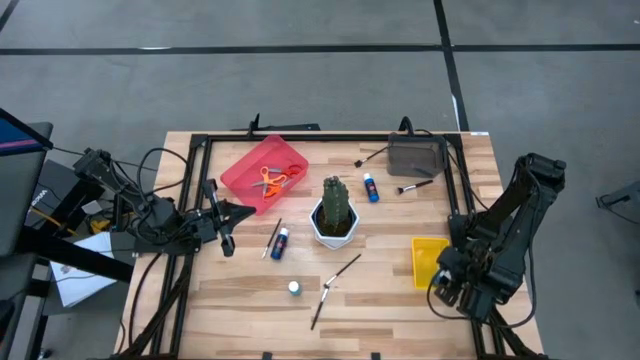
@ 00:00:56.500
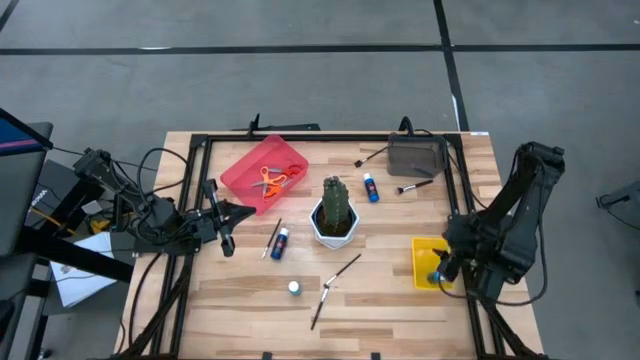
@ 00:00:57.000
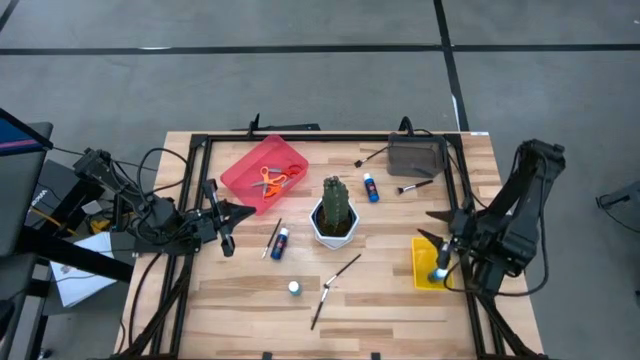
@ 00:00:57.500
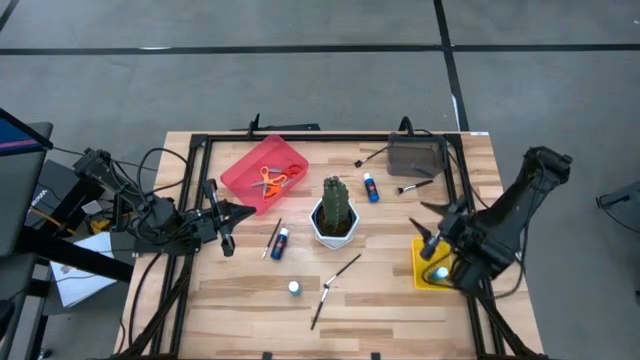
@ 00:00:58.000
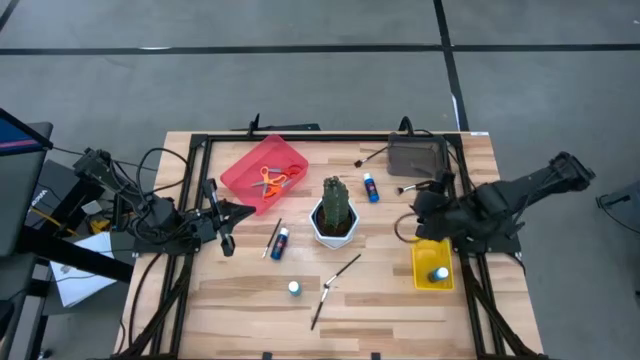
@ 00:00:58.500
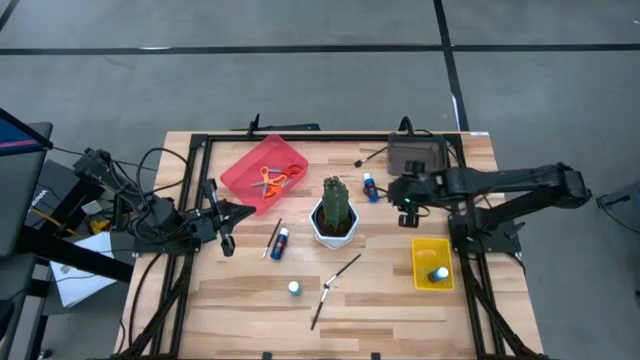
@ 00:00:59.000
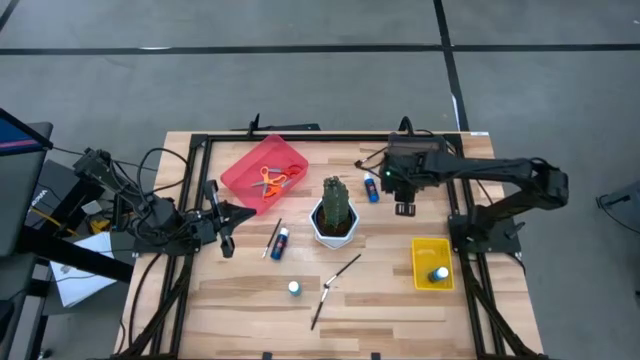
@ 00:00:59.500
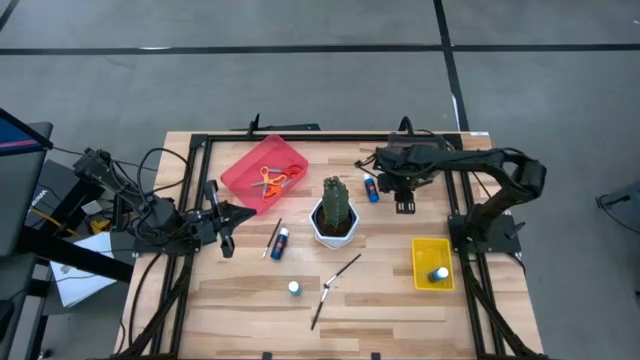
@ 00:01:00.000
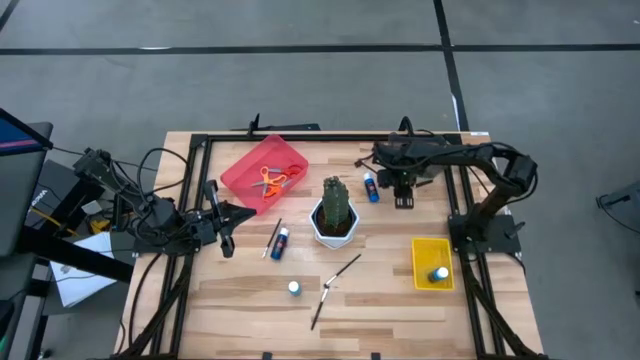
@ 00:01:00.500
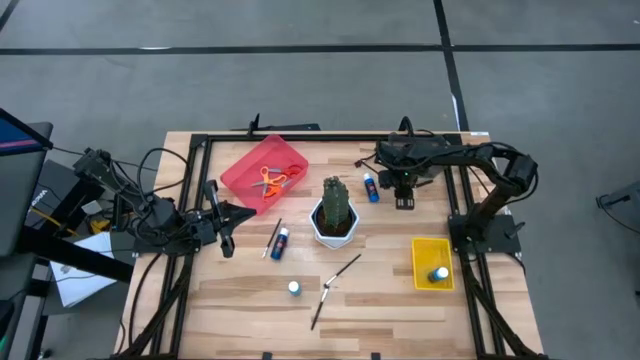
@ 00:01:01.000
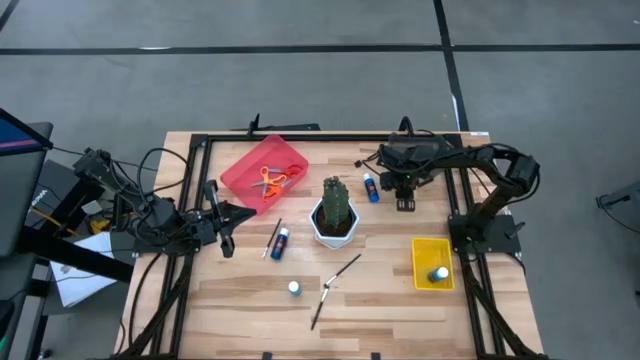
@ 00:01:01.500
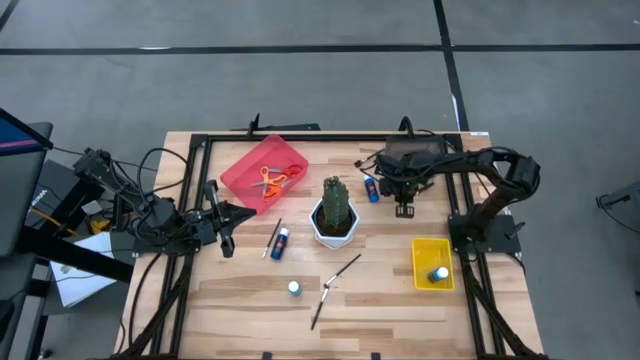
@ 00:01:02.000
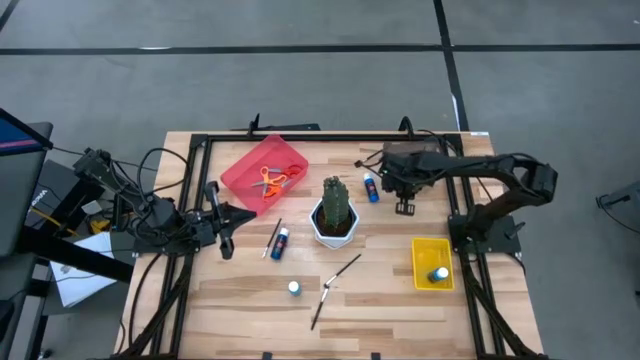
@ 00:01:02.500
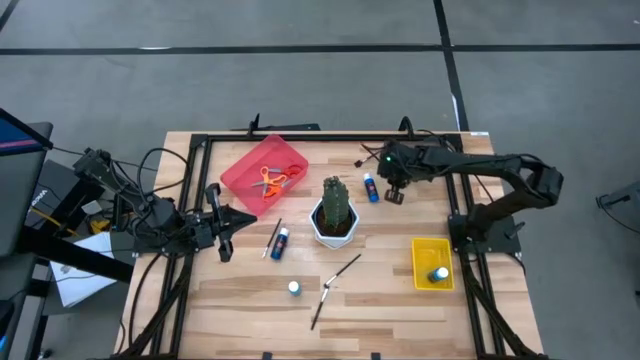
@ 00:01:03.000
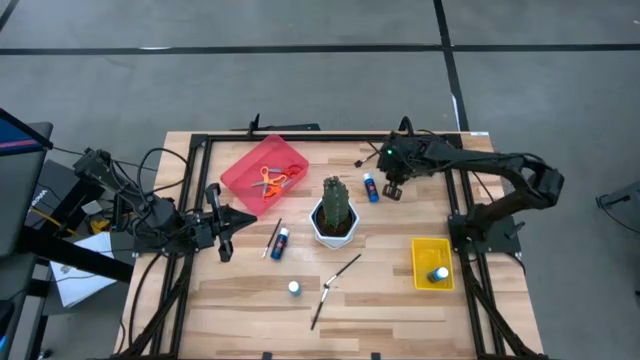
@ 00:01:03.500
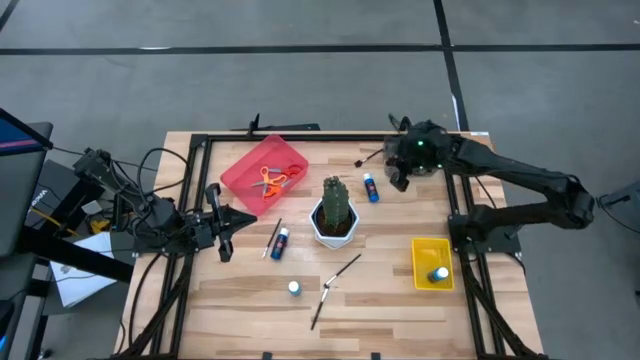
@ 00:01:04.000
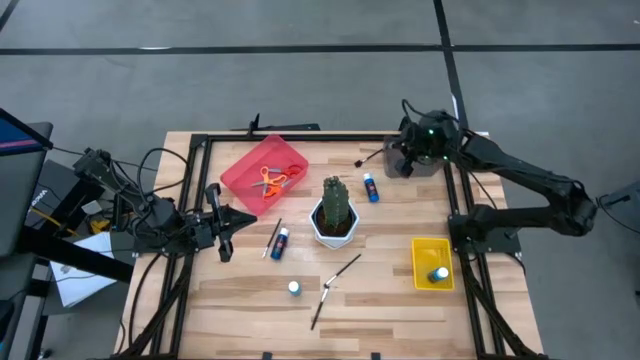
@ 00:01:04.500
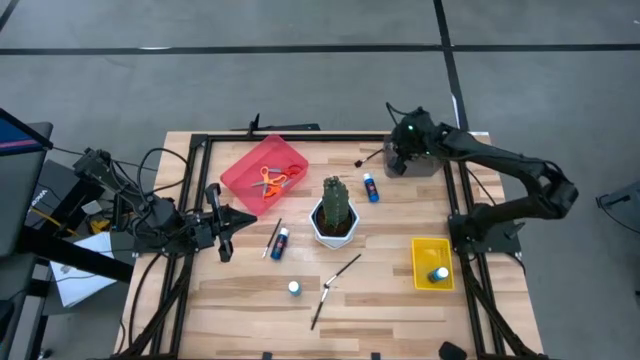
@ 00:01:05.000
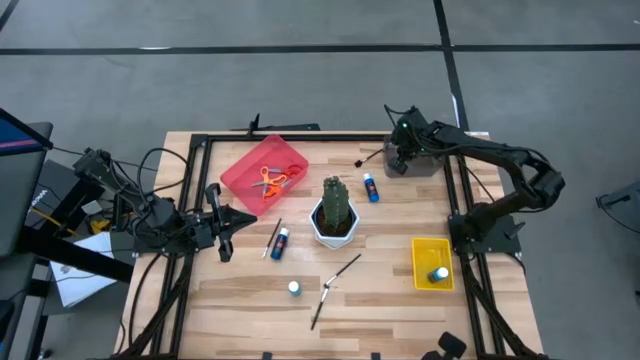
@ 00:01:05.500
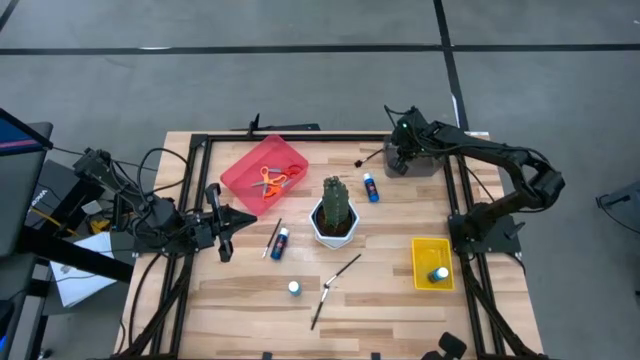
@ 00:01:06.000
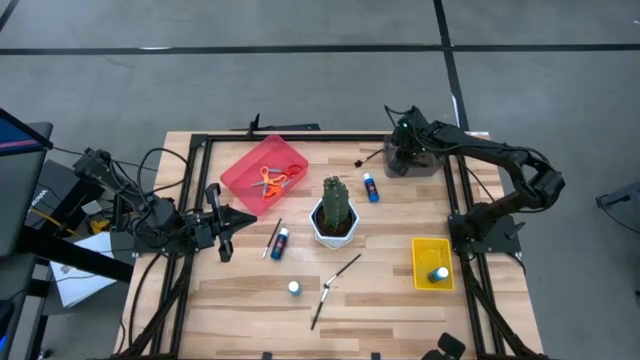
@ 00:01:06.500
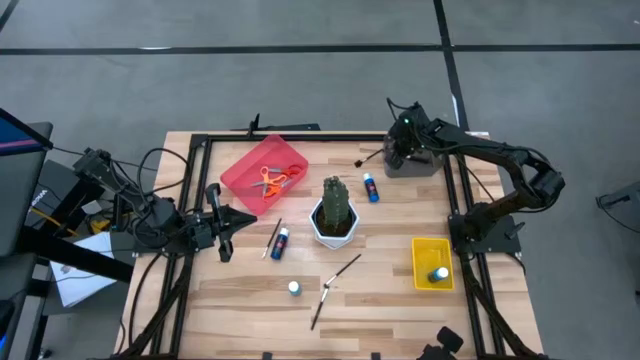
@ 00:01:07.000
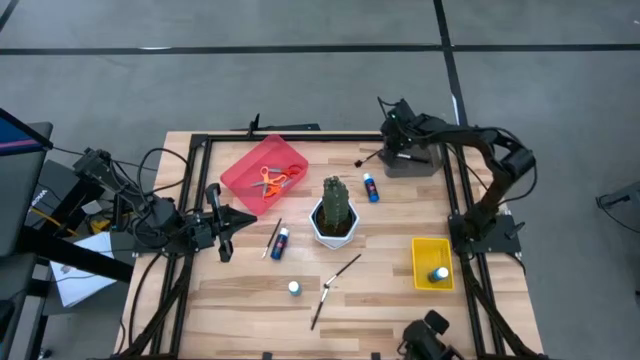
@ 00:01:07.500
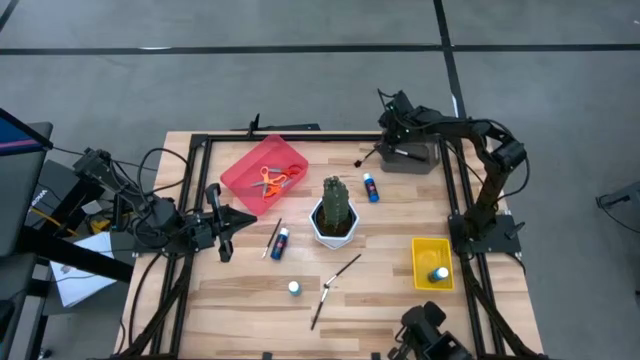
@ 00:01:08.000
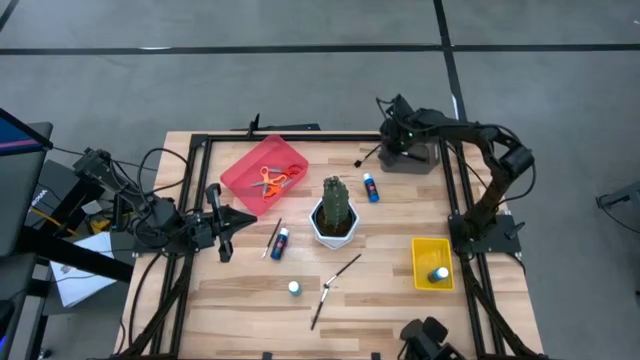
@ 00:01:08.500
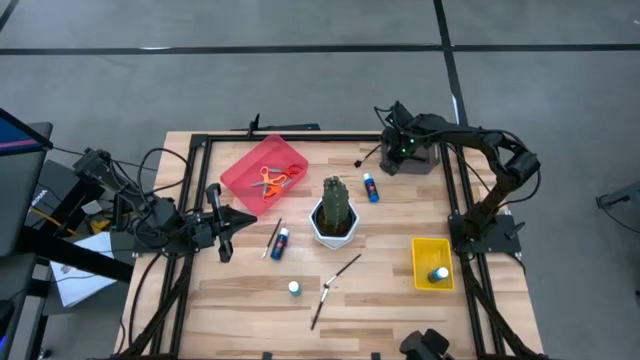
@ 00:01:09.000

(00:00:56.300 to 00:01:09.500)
Task: Pick & Place Paint Supplies
Put the powder brush into the black bin

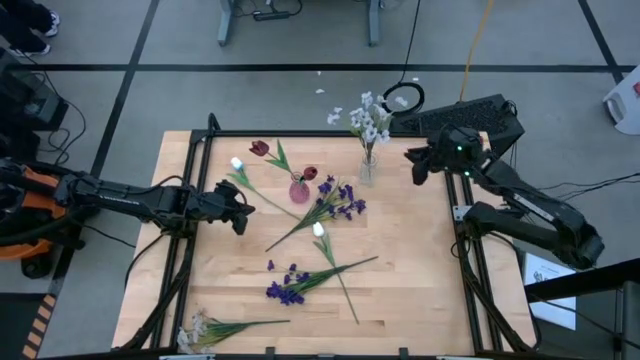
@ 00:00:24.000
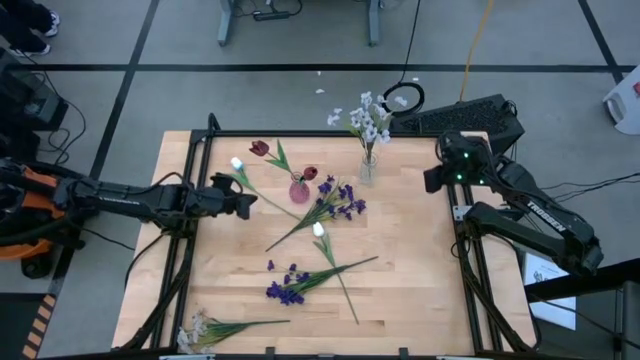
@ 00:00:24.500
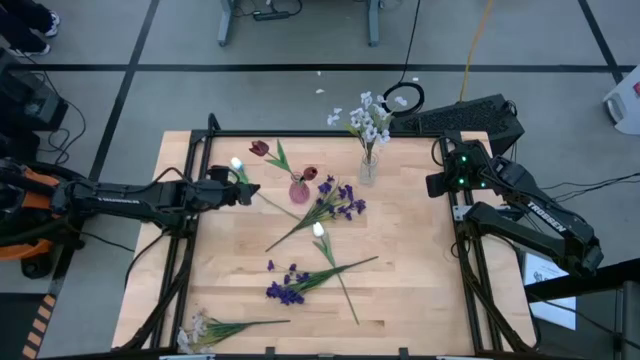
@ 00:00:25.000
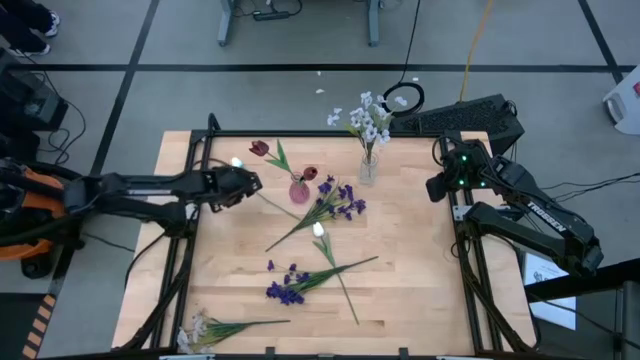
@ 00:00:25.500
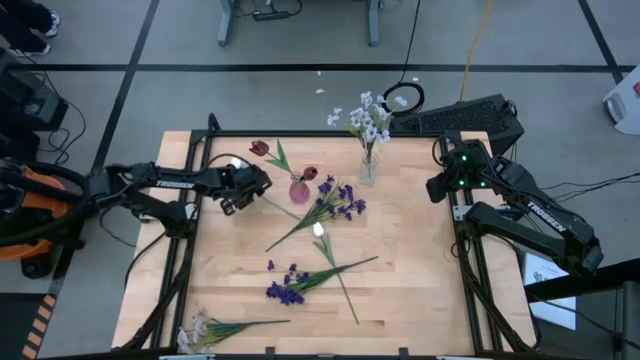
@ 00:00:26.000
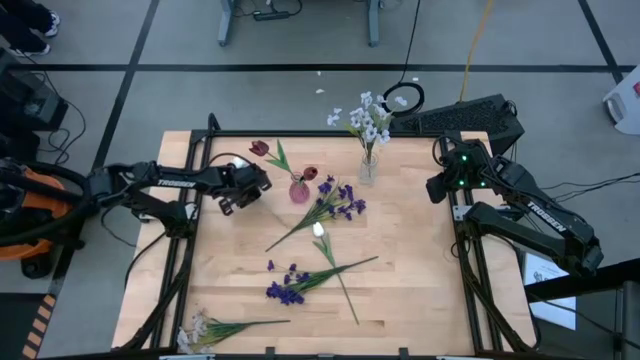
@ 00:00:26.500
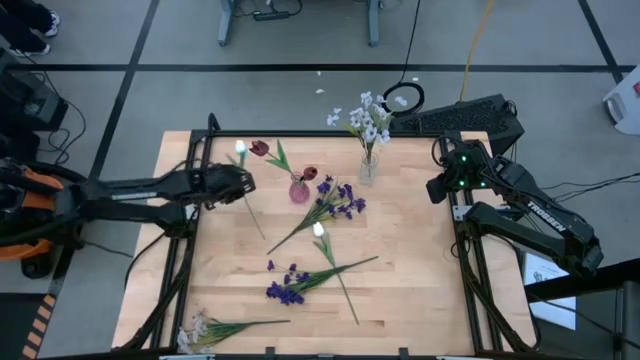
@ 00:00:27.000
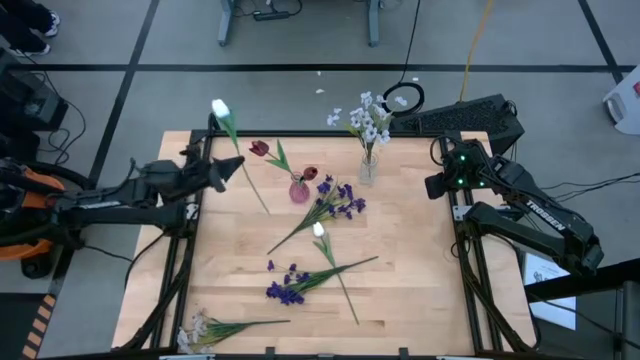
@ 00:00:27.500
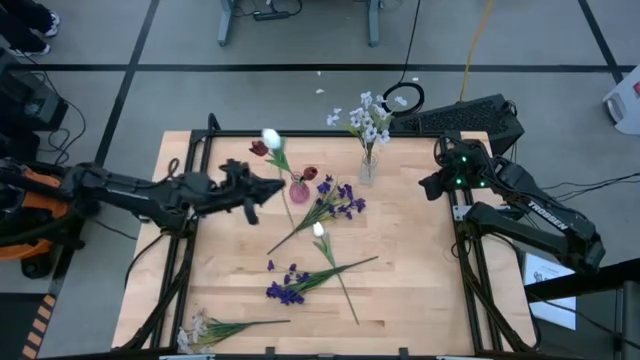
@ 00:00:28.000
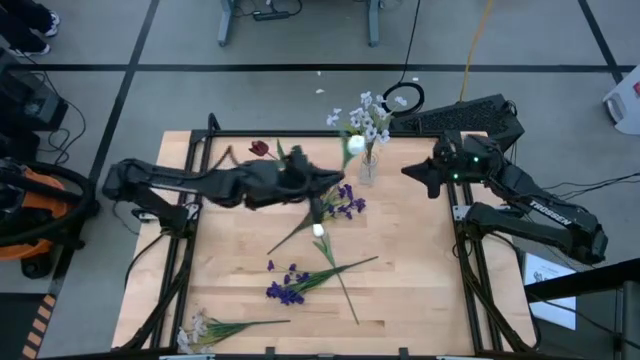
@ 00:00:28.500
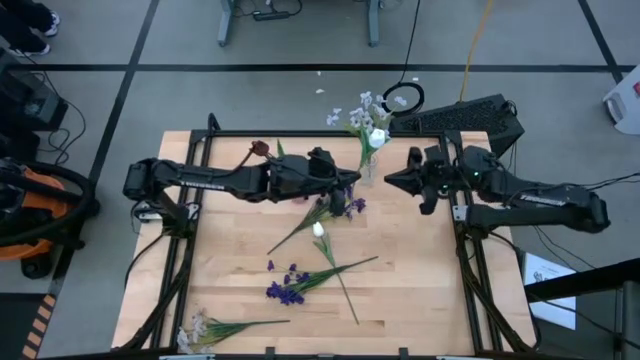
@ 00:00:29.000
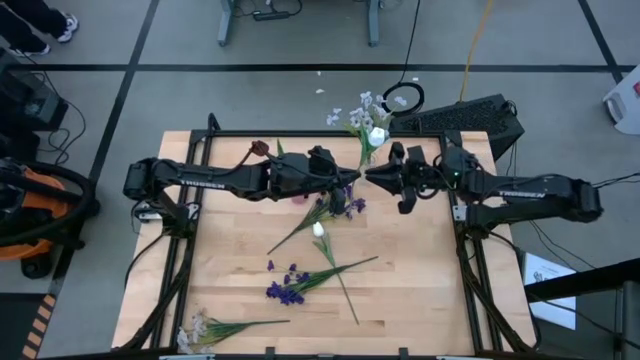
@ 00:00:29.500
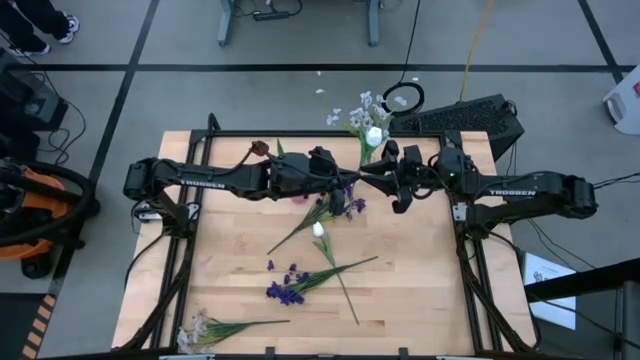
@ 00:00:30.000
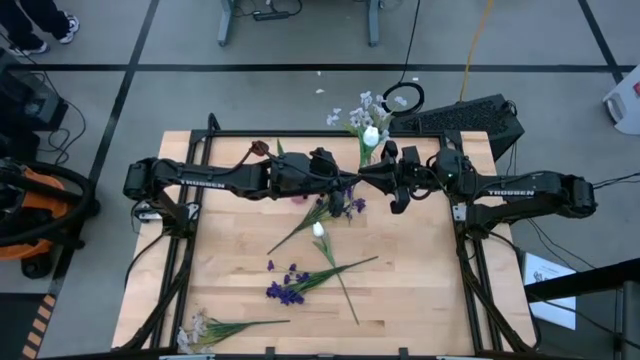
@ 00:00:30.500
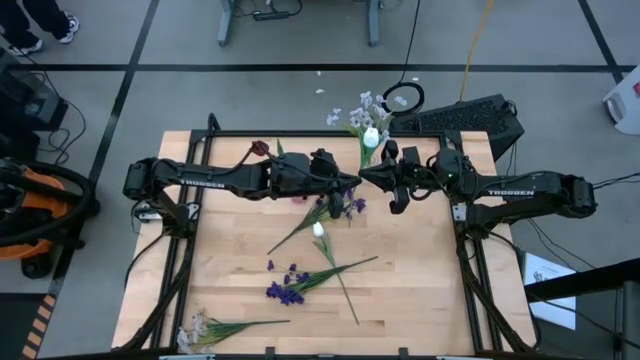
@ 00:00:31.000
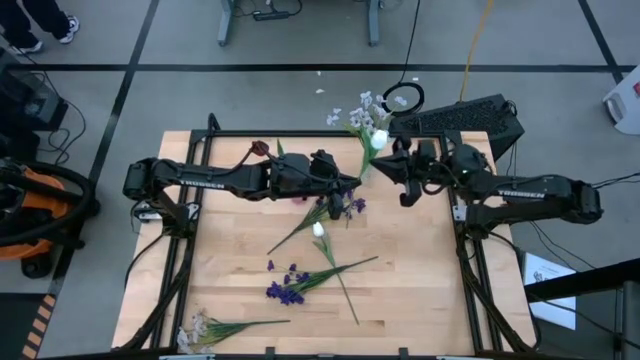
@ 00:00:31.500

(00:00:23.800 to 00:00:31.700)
Task: Sort flowers into vase by color
Put the top white tulip flower into the transparent vase
